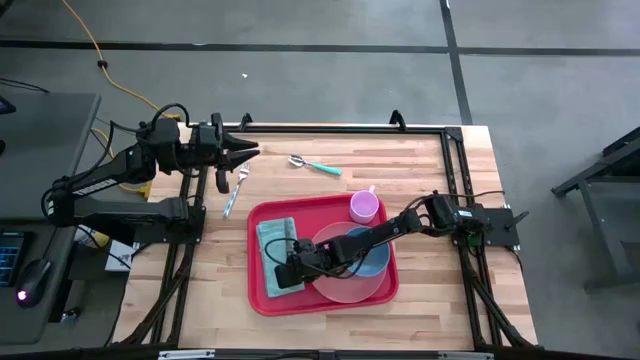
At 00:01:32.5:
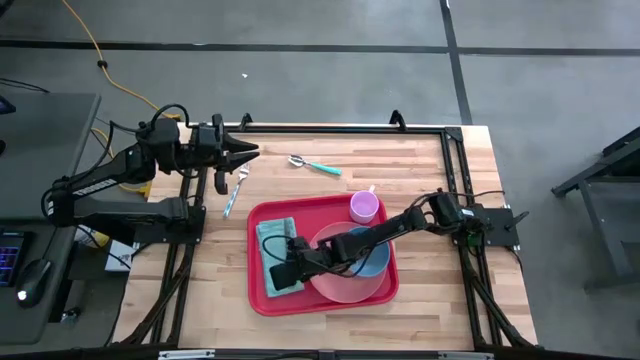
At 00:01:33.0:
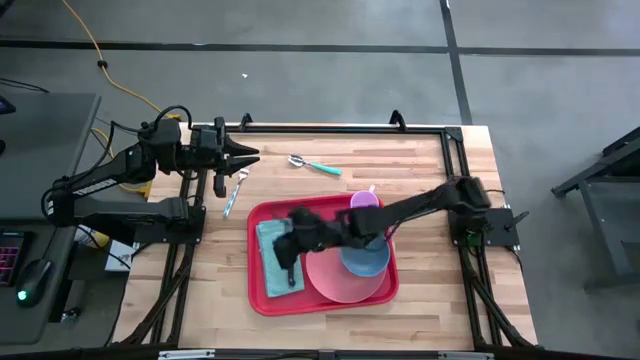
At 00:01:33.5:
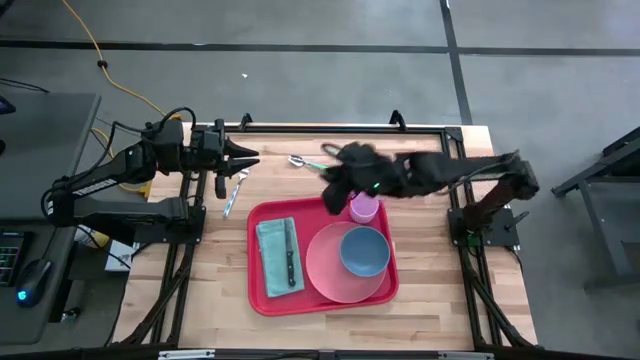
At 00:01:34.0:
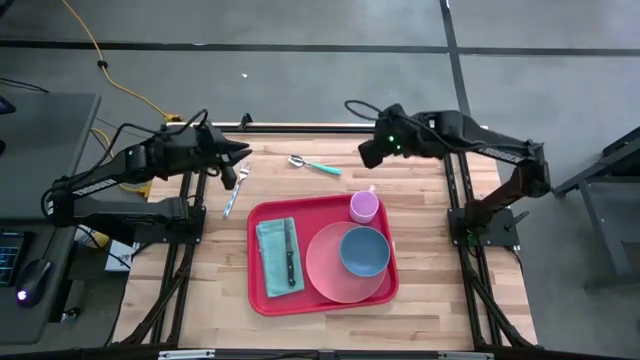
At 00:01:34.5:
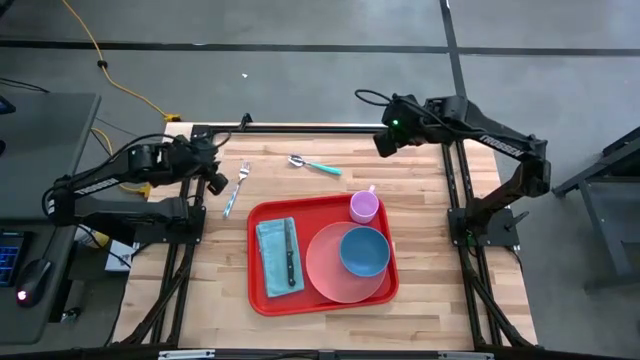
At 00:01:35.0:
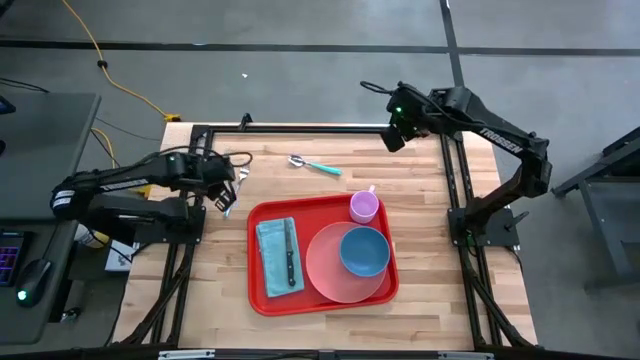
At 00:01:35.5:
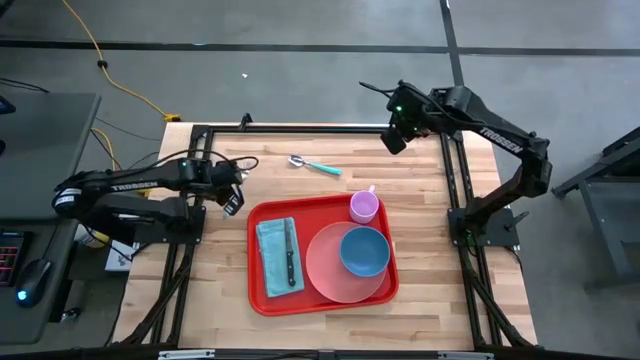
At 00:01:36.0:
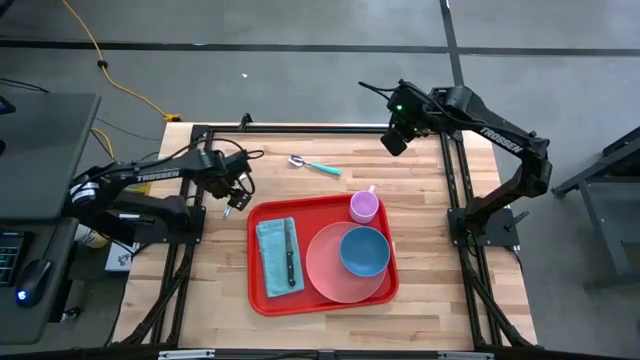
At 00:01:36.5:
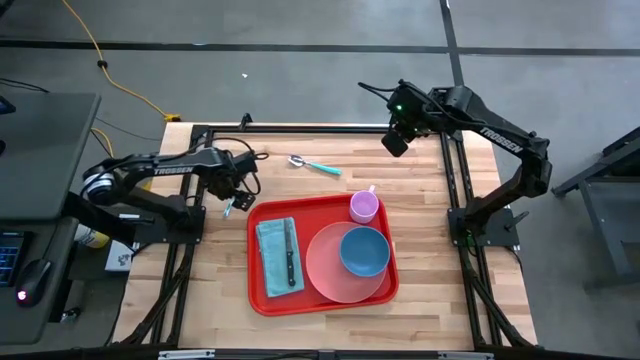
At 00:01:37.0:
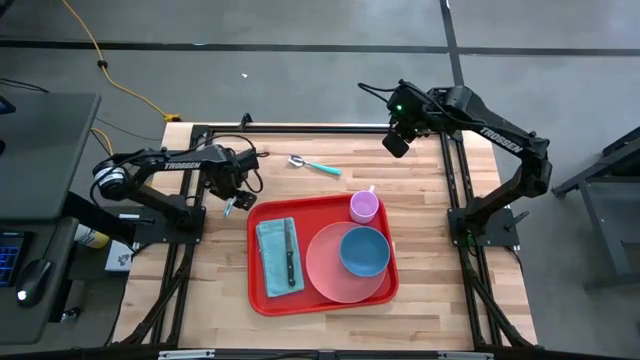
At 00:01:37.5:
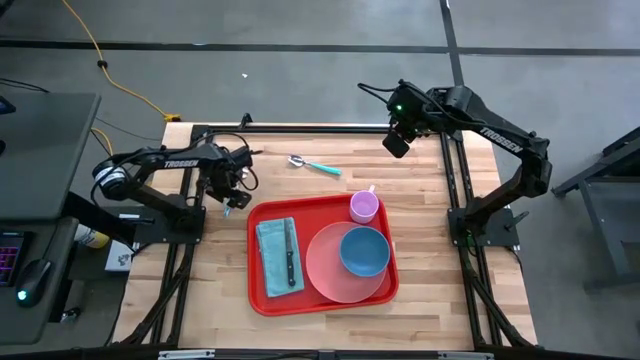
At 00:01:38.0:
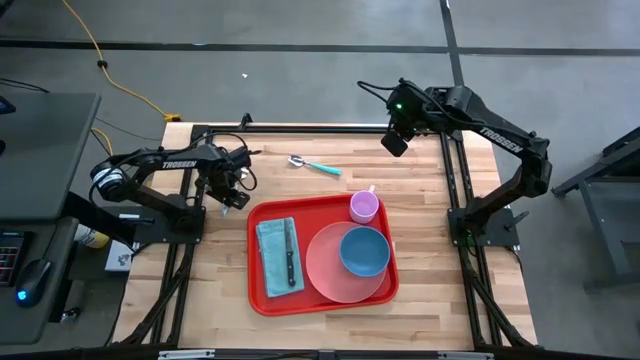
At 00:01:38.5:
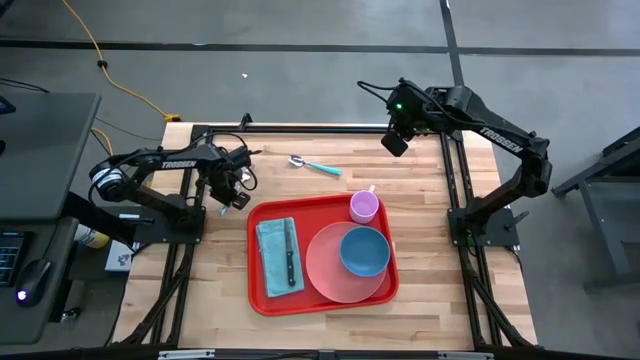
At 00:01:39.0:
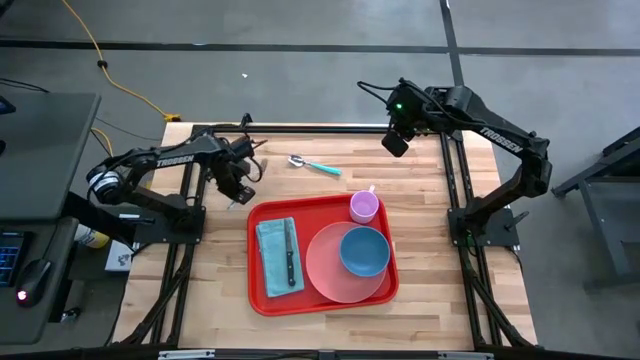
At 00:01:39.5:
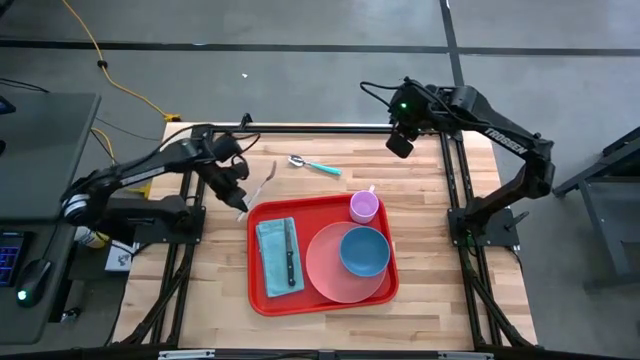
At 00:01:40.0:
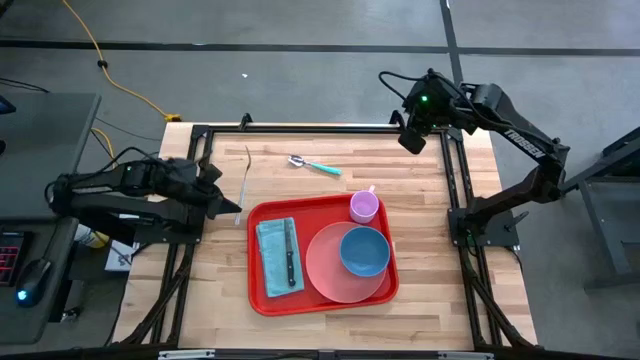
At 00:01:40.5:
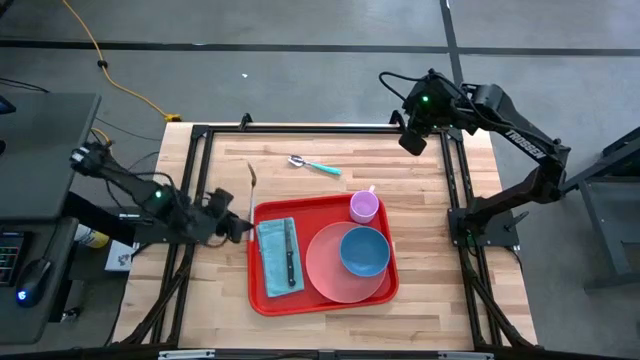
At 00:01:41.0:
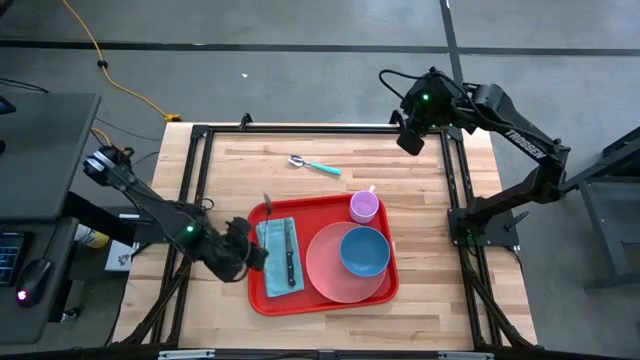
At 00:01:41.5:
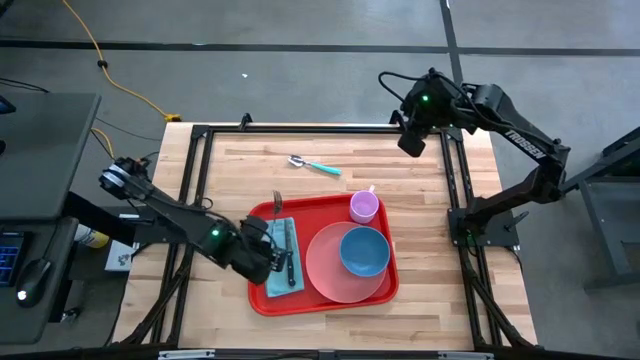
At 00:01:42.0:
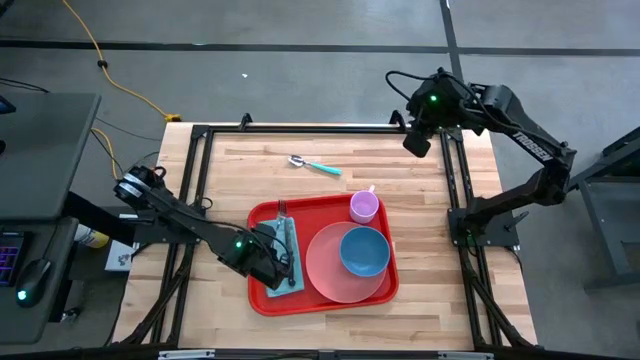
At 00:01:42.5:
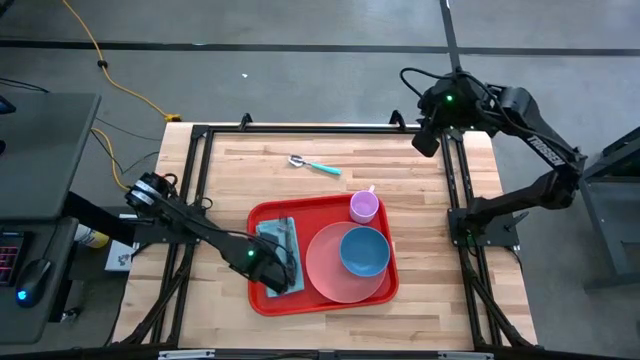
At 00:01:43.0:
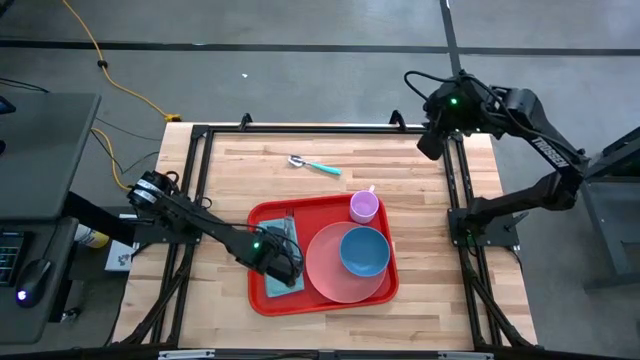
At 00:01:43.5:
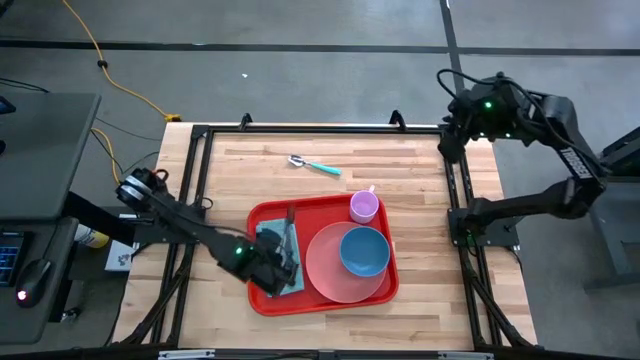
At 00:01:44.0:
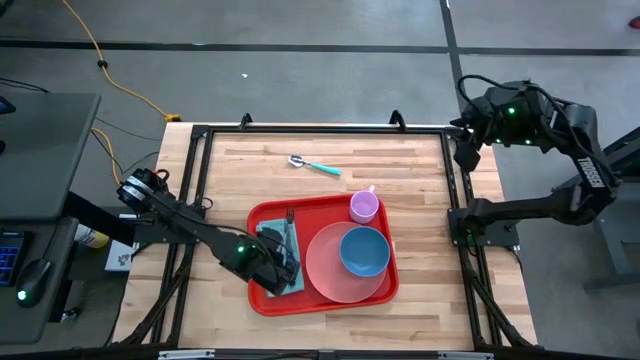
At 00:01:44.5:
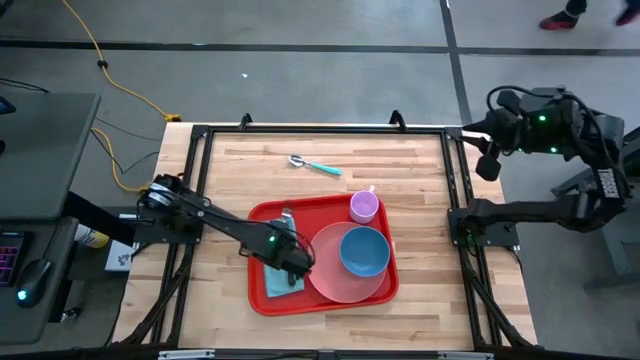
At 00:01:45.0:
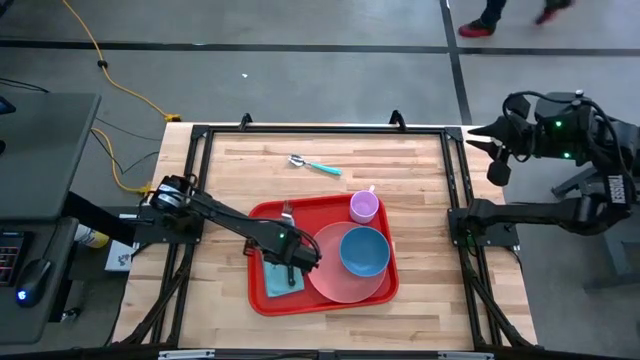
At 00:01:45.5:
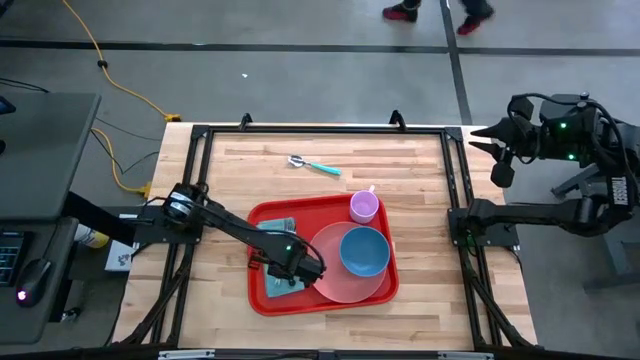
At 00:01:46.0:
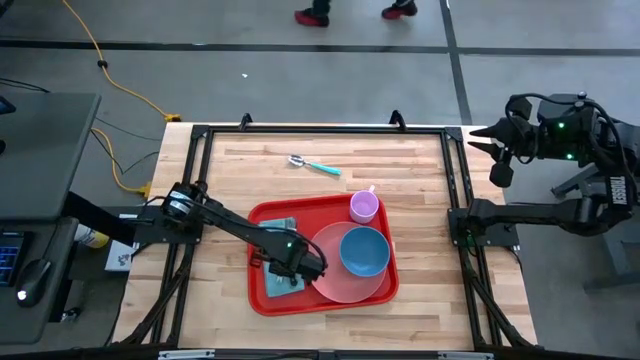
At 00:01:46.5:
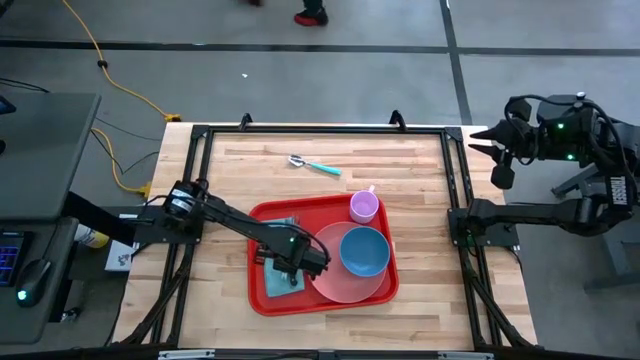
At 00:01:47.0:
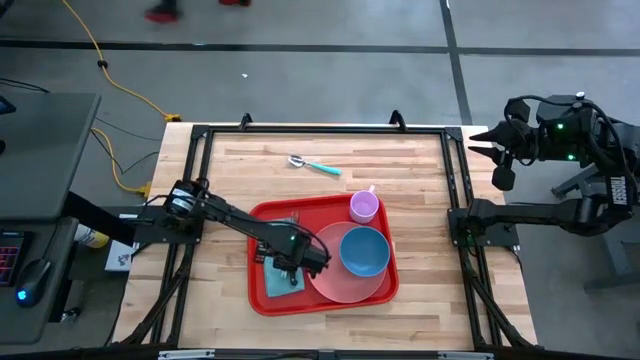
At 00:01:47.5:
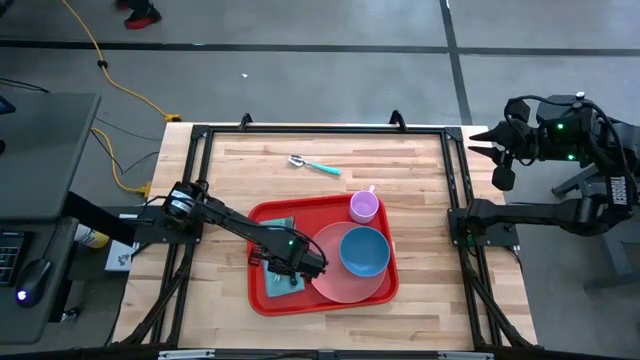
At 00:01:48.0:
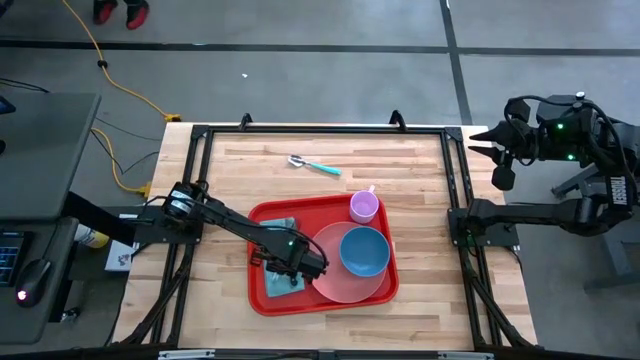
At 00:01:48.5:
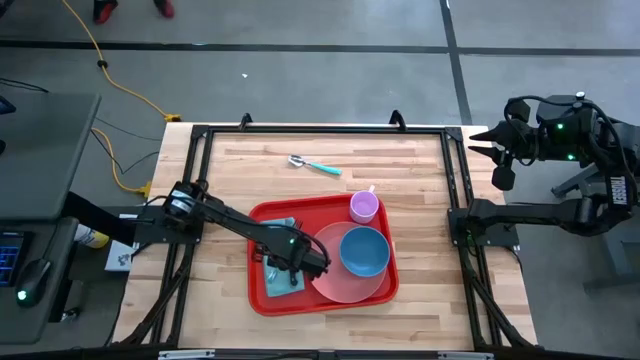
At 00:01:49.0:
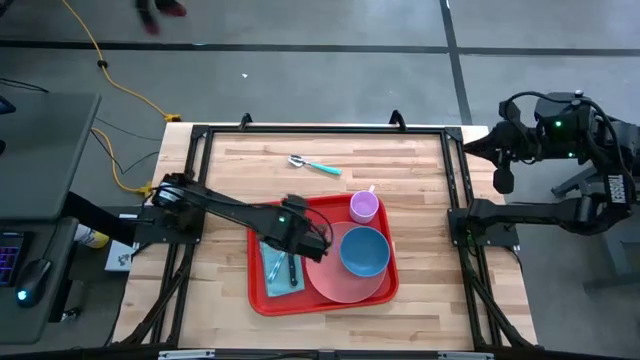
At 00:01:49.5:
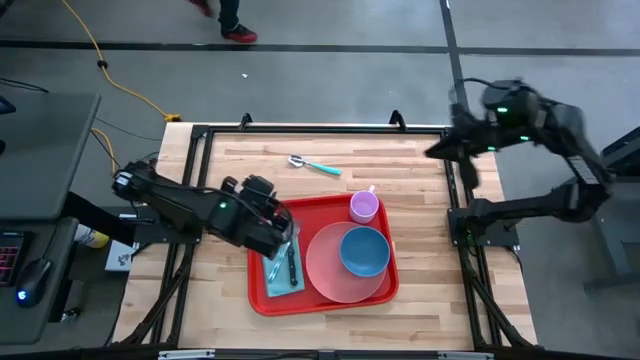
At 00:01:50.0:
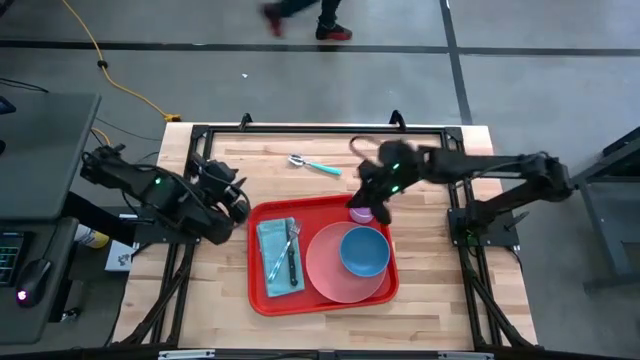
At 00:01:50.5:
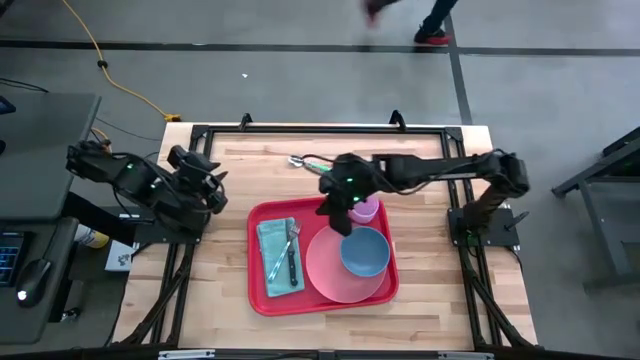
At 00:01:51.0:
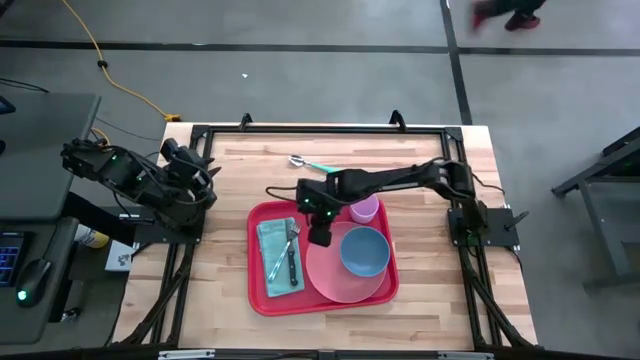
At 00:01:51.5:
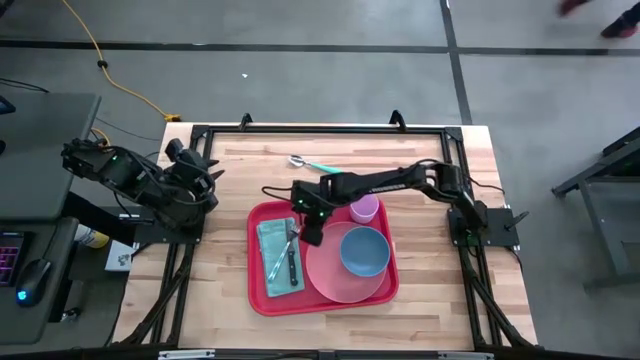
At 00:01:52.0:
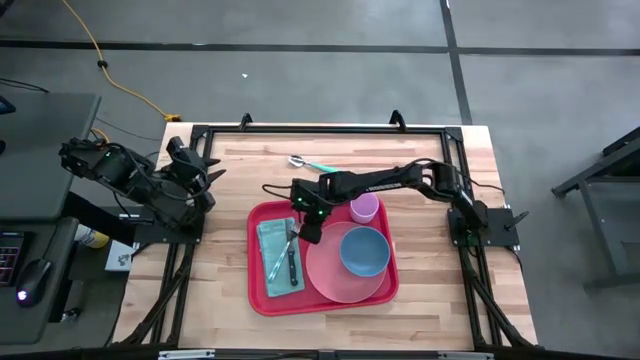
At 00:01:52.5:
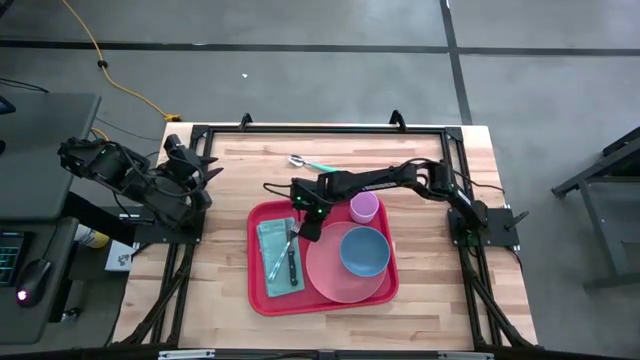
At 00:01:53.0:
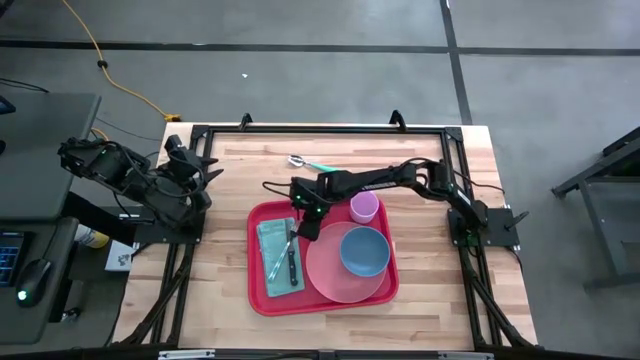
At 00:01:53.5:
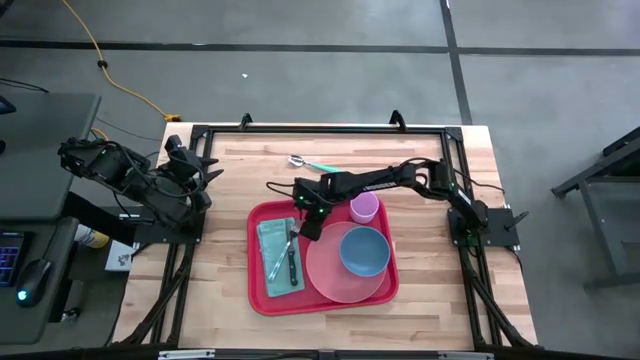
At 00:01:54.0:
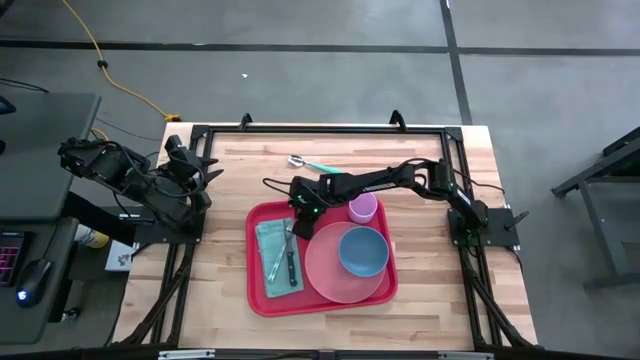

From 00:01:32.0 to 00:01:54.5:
Task: Set up tray
Put the blue fork on the blue napkin to the left of the black knife
